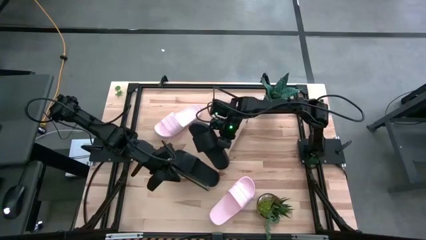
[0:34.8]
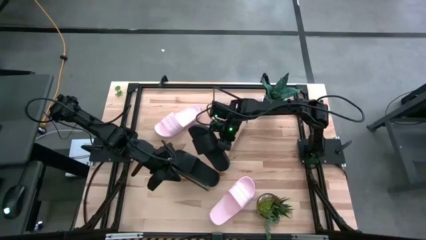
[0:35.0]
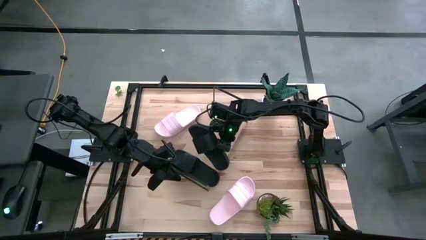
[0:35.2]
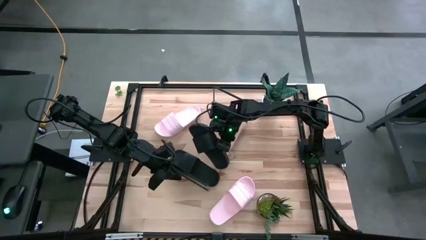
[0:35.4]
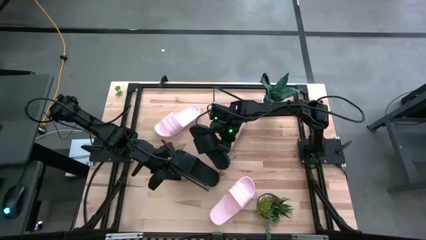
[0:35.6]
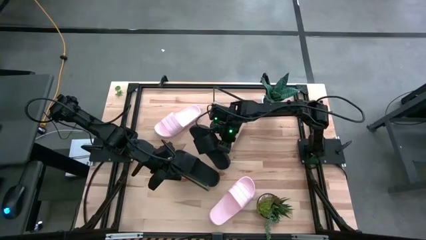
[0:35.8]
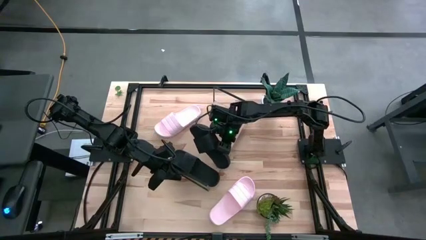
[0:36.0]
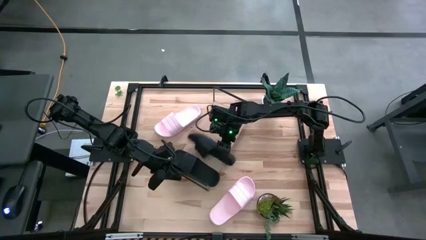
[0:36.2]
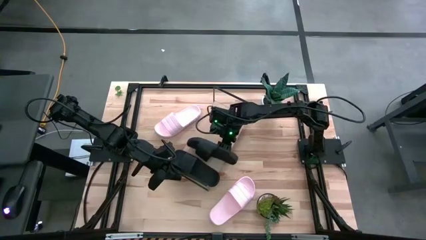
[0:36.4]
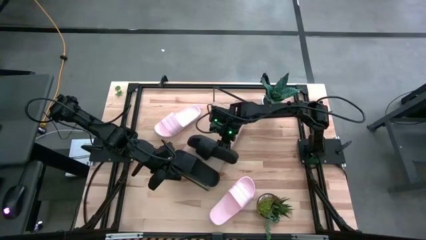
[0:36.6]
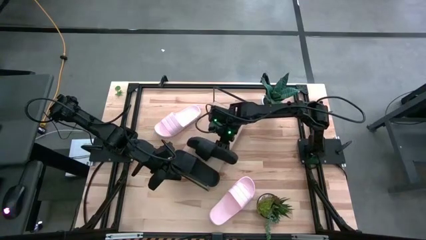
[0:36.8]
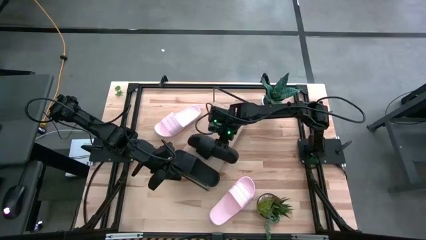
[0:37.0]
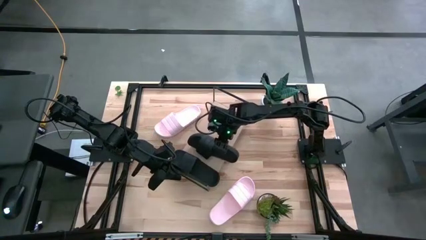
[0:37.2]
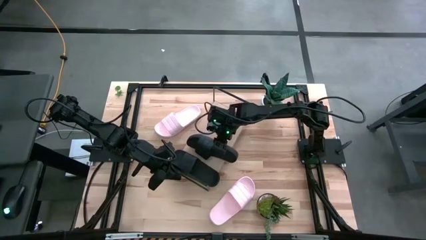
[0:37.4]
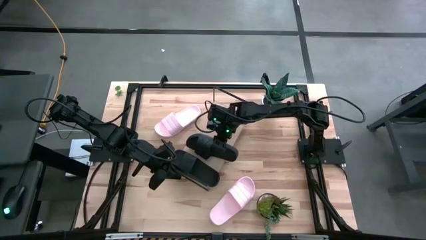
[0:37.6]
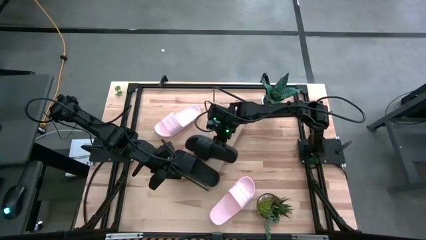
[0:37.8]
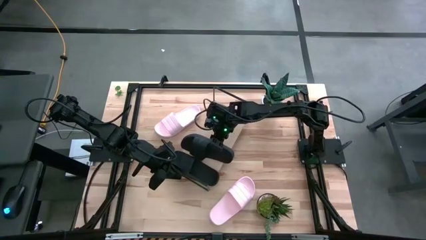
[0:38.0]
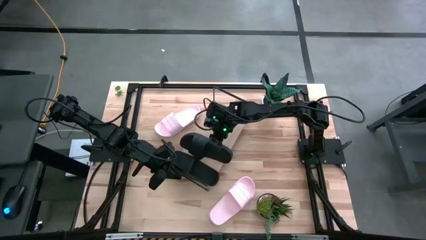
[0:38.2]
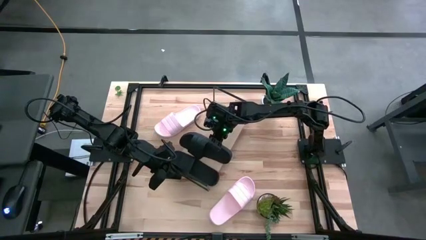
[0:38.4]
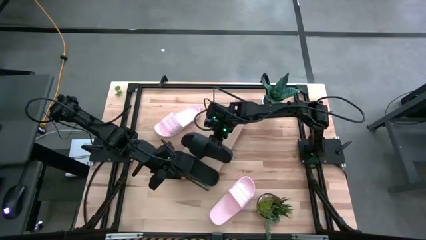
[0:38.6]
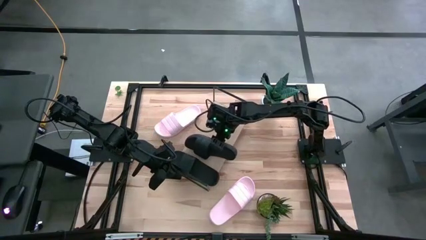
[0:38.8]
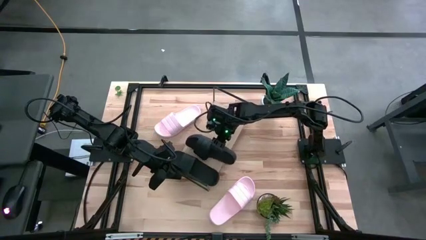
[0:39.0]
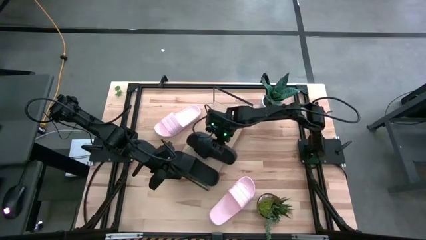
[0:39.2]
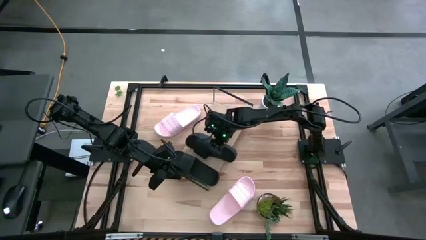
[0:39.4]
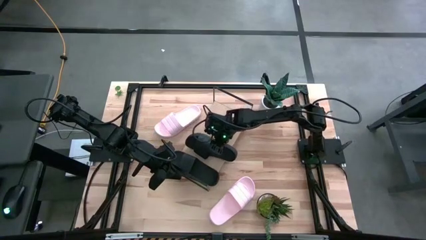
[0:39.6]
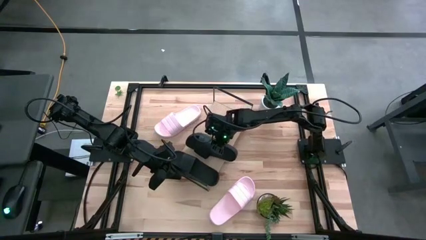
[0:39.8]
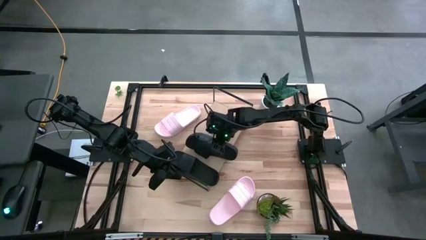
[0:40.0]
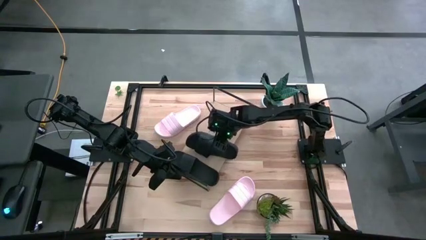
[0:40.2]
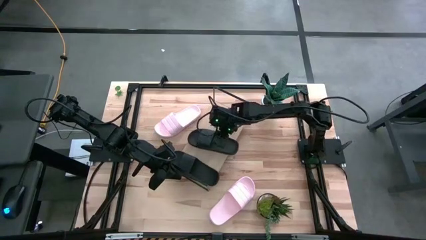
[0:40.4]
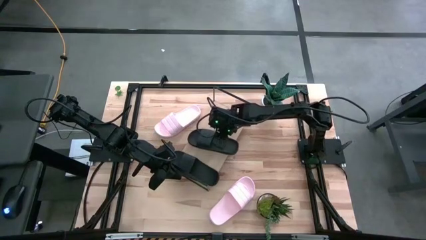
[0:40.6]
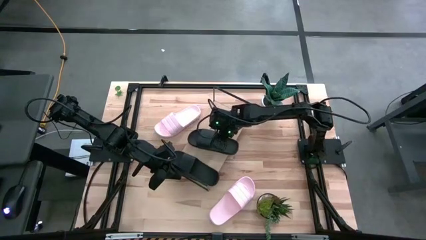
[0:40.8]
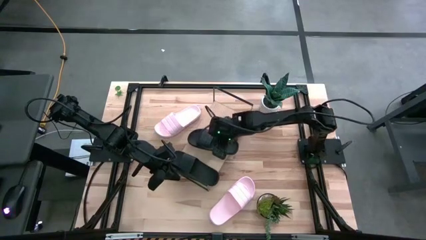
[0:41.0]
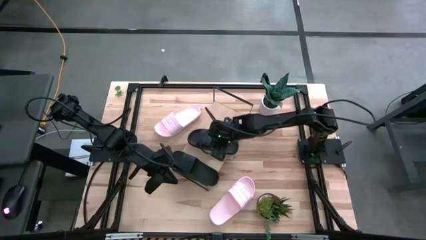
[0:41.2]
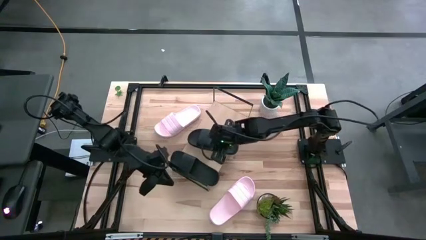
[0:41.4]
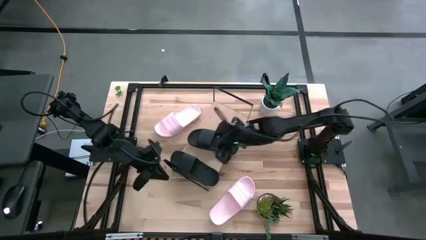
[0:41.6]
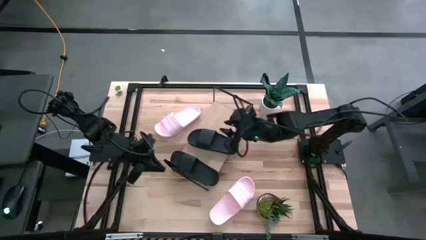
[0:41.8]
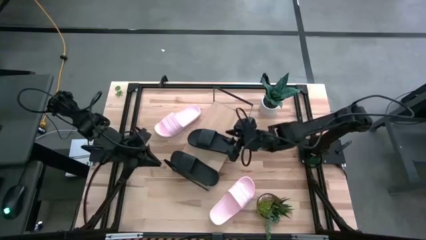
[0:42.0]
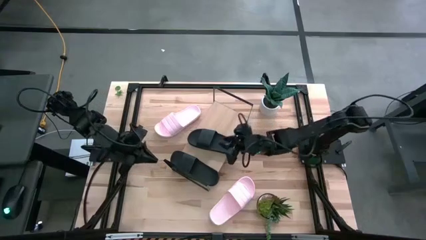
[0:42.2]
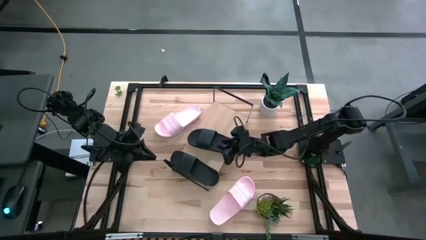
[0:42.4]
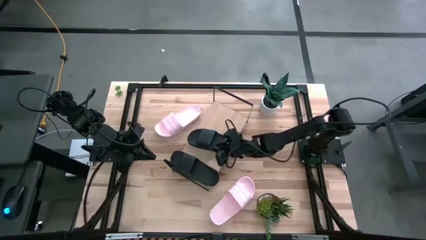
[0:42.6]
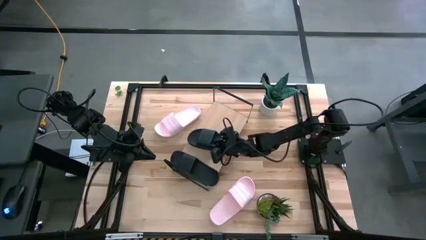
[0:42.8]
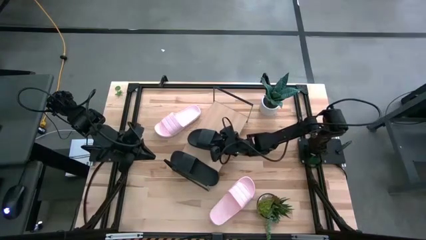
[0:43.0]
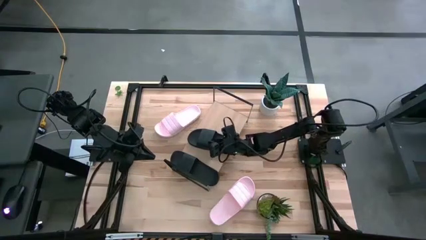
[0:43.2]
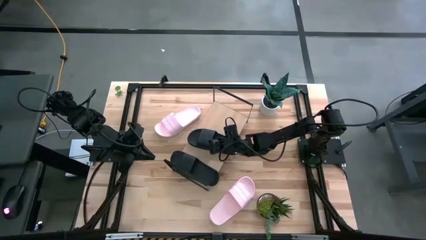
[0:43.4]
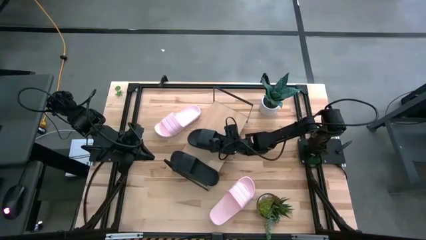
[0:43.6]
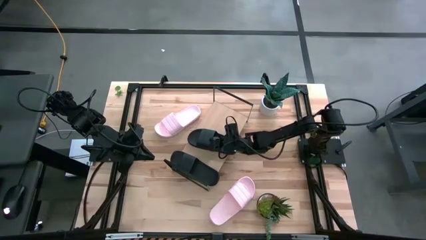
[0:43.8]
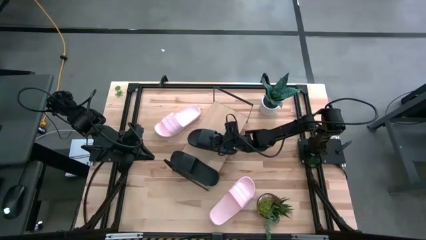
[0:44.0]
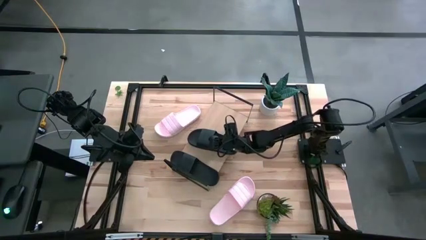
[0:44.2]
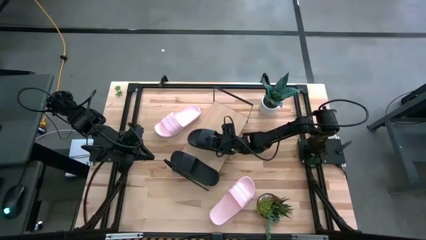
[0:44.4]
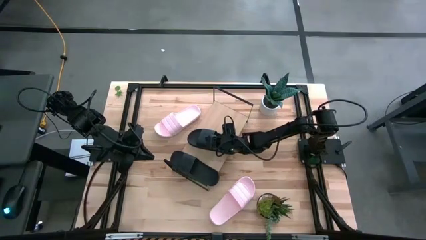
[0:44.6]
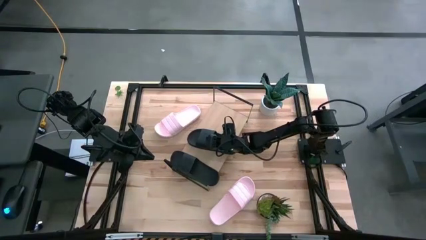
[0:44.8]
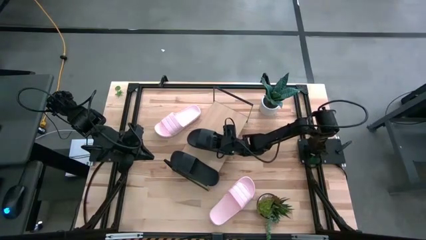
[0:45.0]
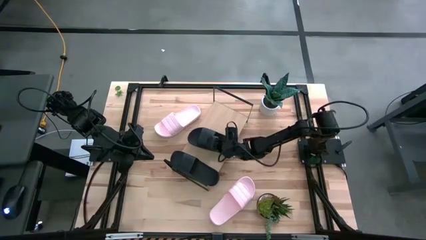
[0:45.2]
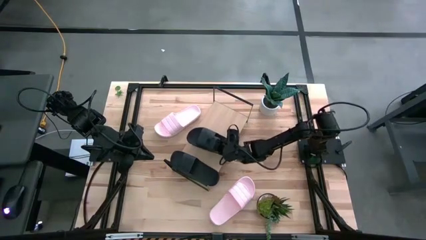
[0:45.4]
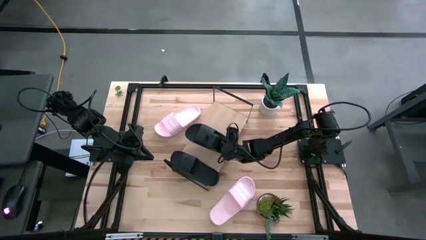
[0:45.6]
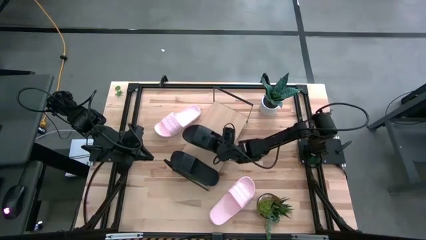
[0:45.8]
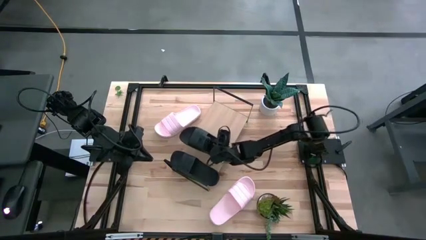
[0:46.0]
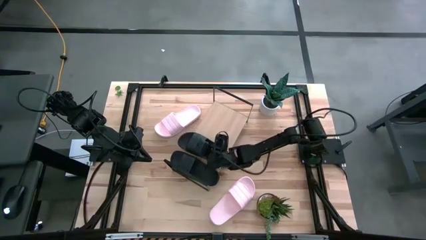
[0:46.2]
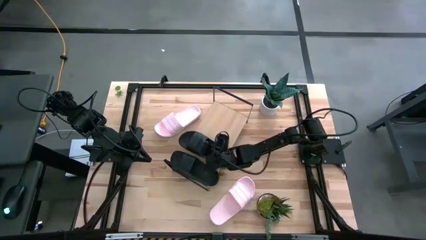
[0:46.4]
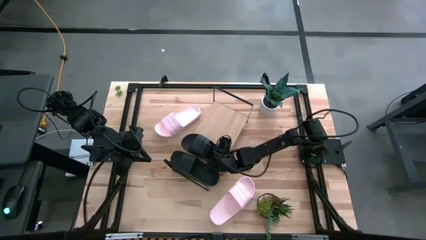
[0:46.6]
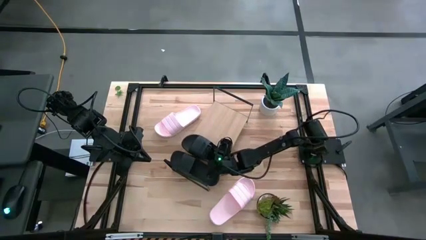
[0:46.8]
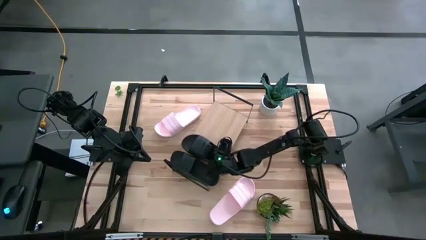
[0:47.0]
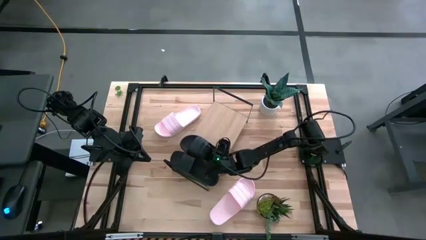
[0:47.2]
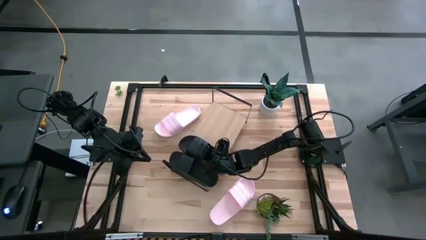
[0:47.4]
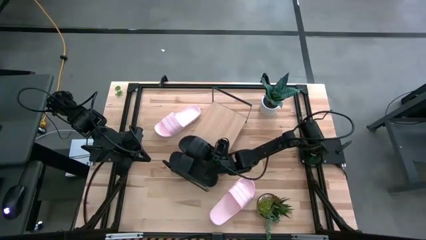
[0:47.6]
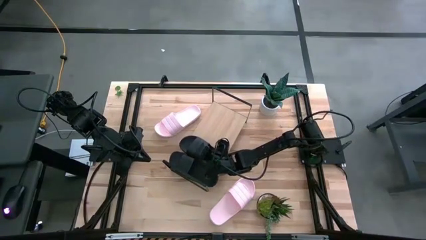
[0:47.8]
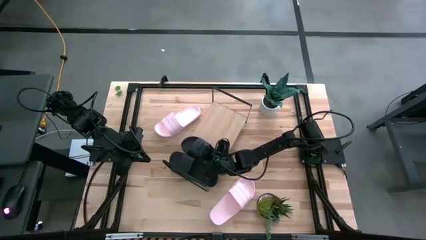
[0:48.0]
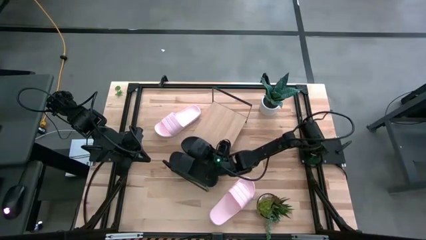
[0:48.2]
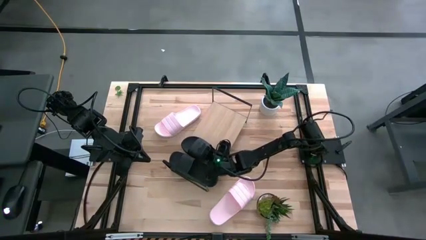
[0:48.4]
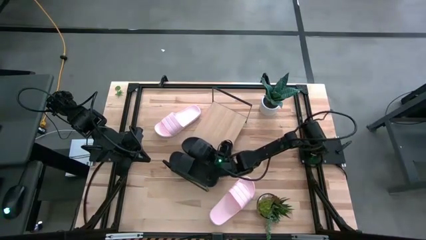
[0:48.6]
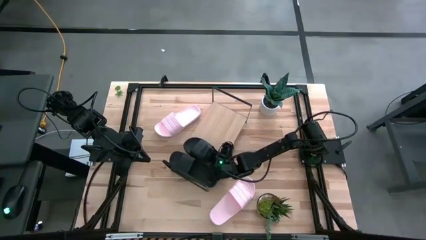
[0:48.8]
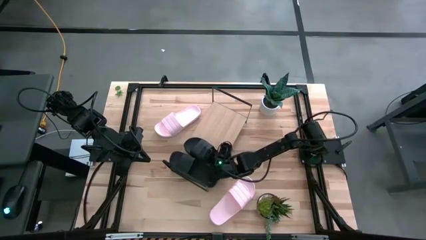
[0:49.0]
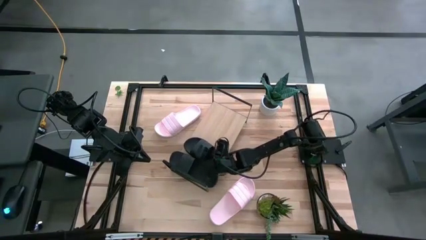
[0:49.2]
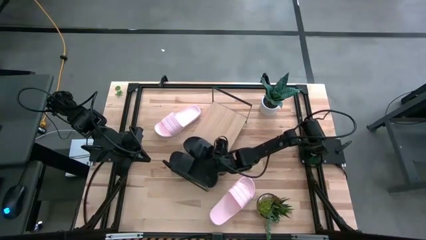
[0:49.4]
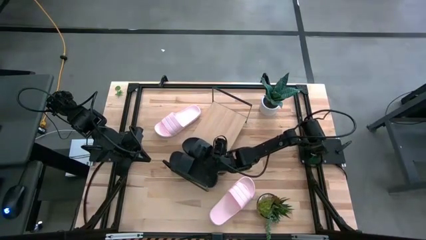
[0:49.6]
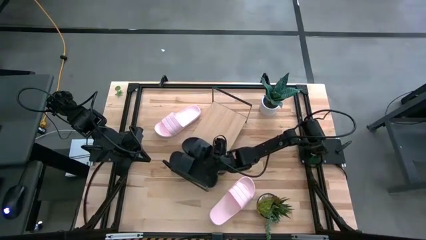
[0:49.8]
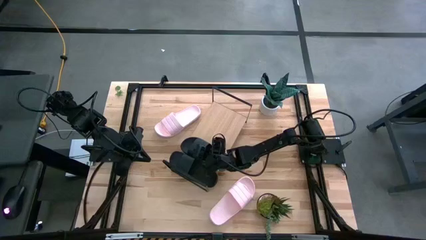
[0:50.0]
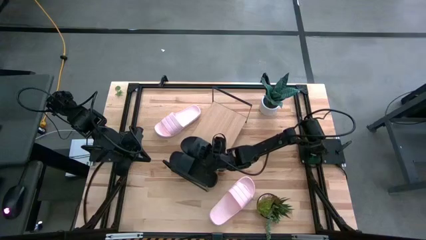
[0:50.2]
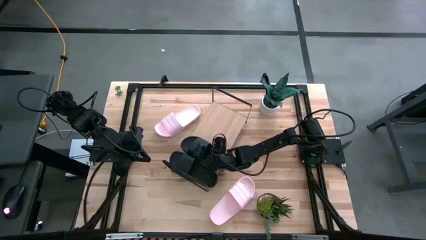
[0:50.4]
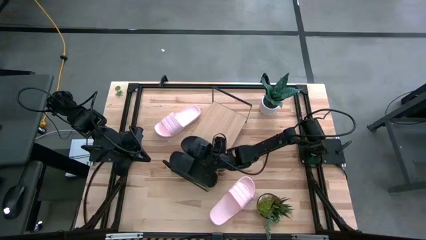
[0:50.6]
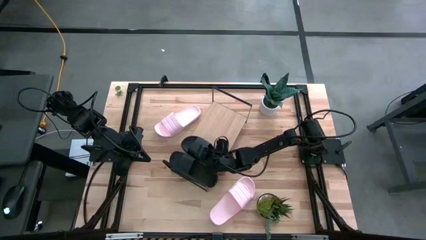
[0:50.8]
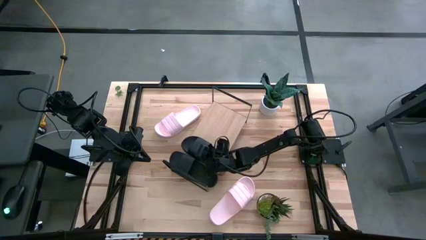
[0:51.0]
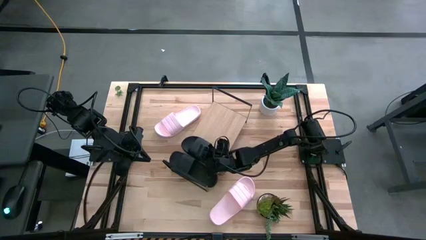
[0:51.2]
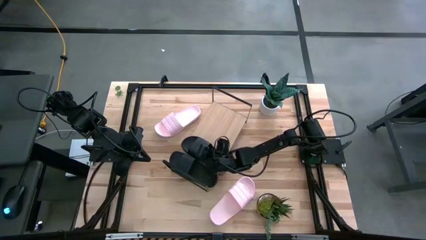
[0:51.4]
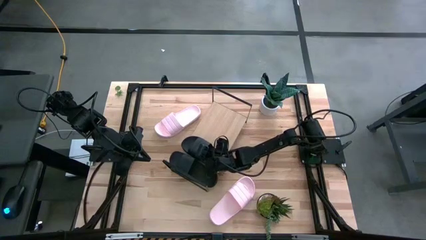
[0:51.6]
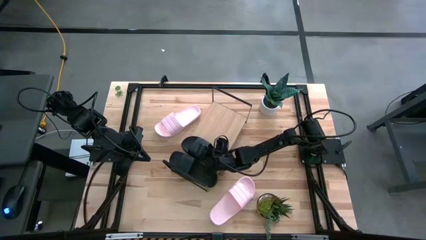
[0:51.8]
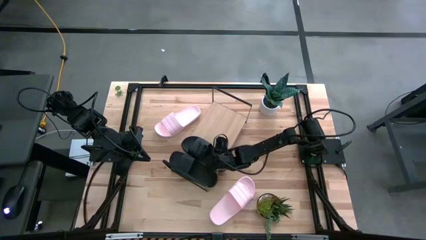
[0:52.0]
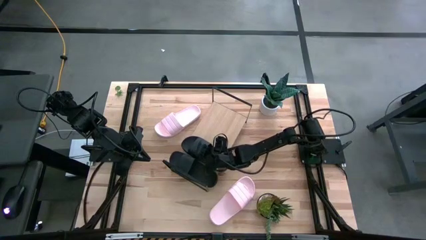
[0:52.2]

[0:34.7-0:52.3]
Task: Pick and place slides into the shelf
Put the black slipper on the shelf
